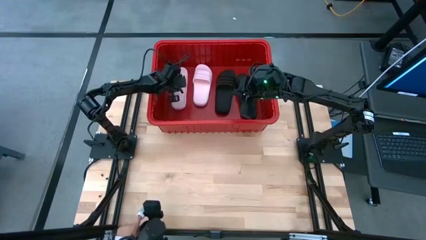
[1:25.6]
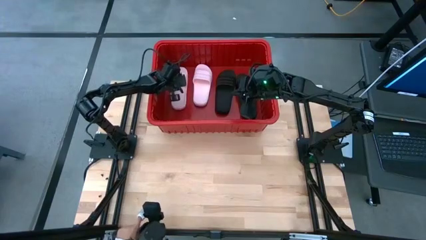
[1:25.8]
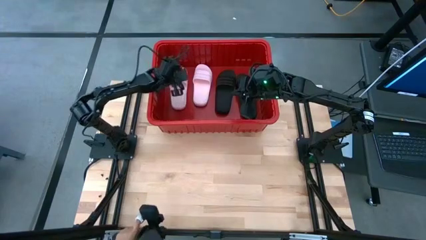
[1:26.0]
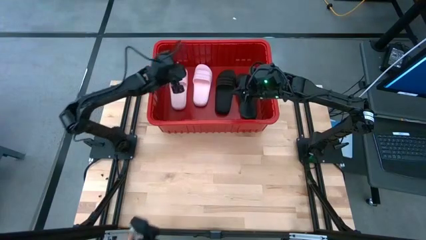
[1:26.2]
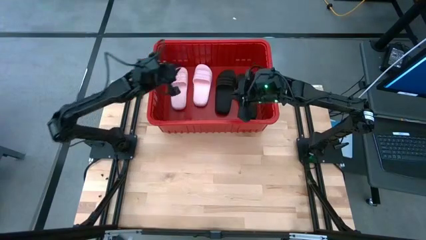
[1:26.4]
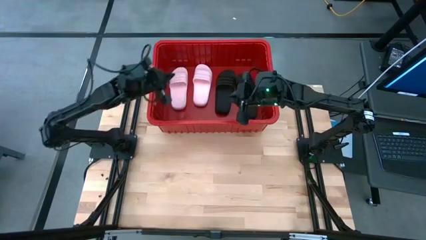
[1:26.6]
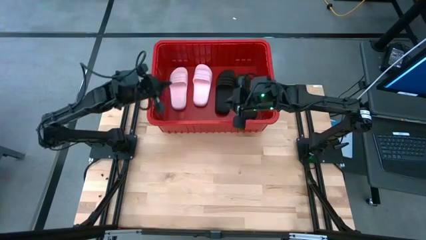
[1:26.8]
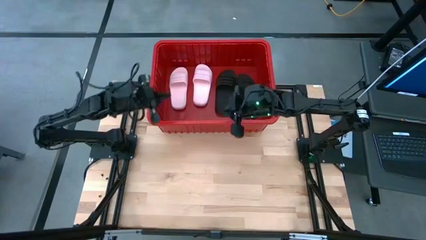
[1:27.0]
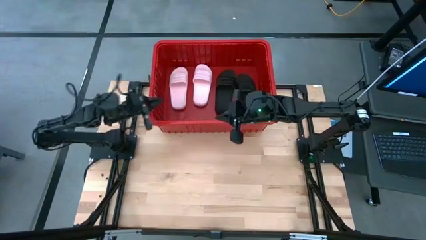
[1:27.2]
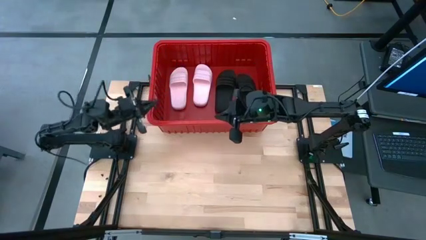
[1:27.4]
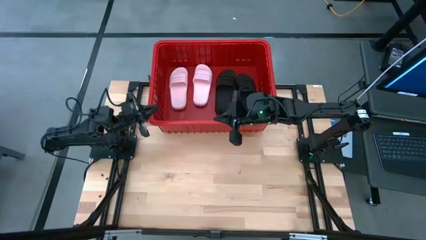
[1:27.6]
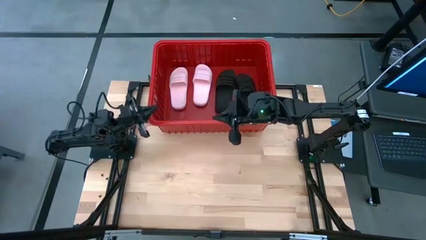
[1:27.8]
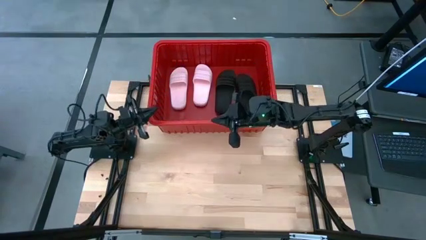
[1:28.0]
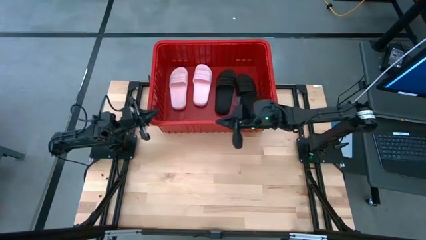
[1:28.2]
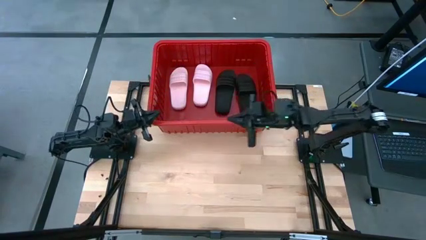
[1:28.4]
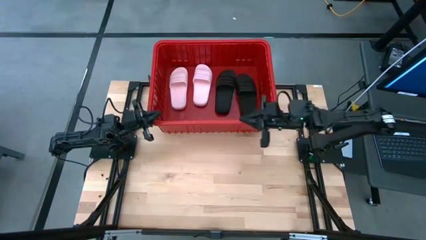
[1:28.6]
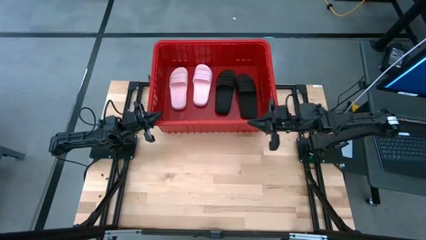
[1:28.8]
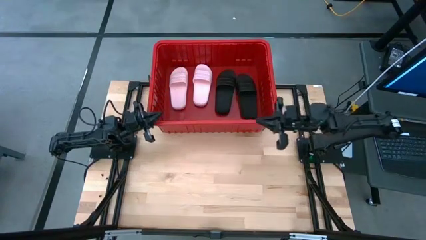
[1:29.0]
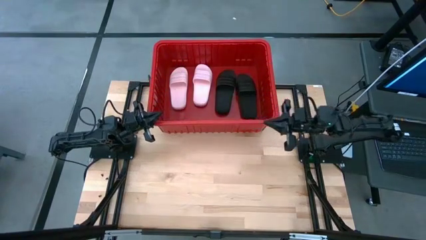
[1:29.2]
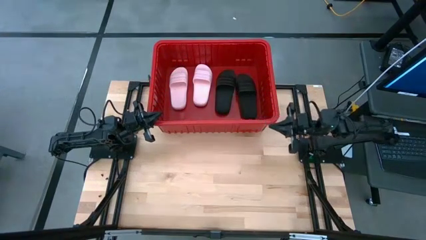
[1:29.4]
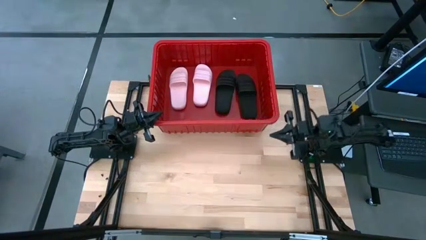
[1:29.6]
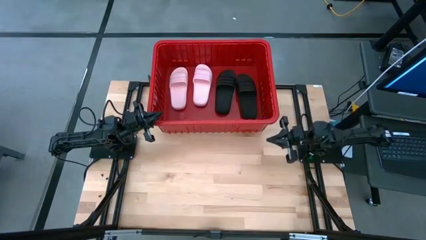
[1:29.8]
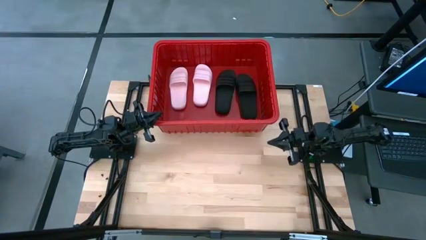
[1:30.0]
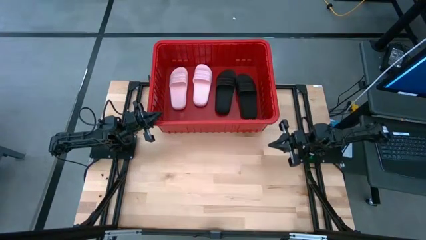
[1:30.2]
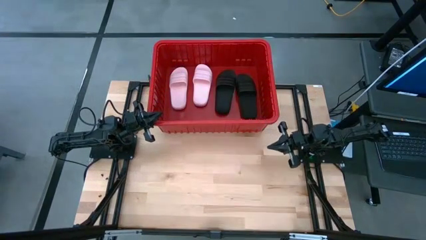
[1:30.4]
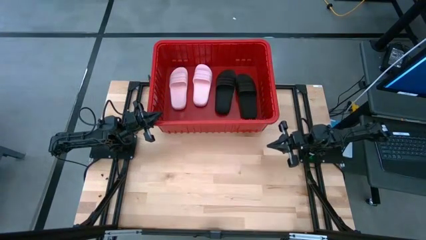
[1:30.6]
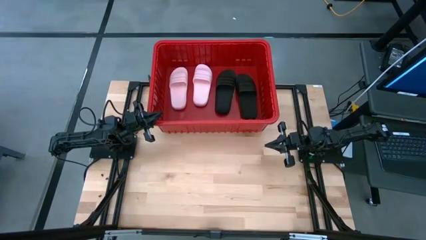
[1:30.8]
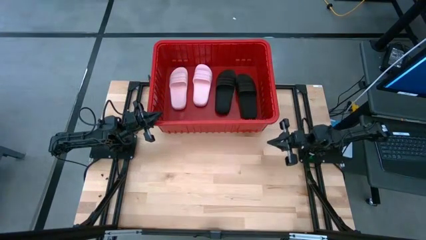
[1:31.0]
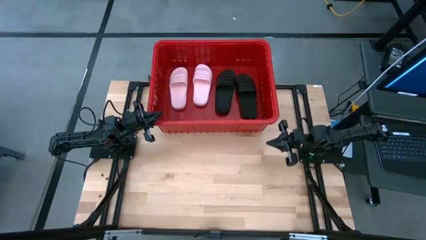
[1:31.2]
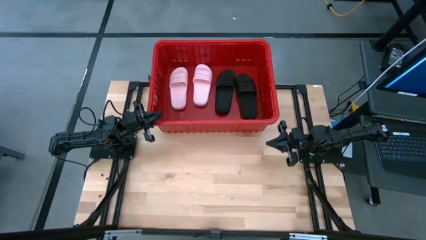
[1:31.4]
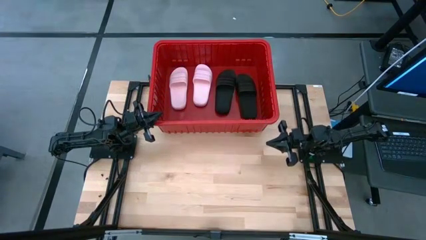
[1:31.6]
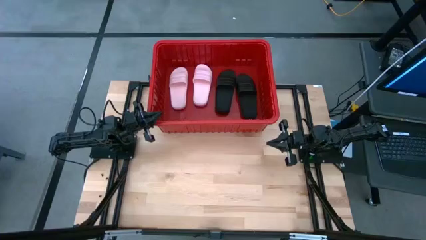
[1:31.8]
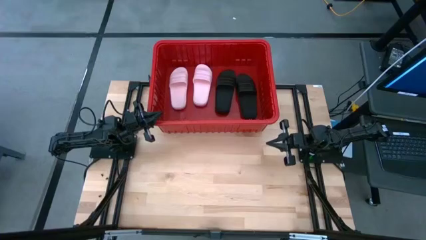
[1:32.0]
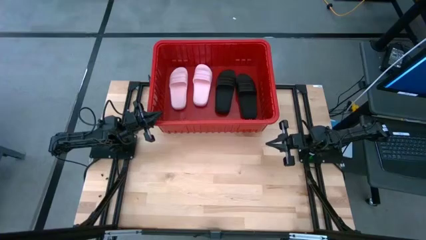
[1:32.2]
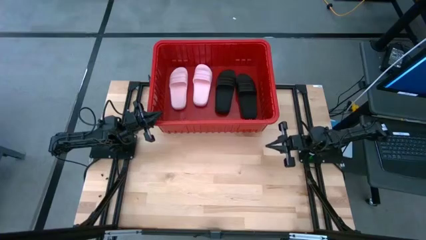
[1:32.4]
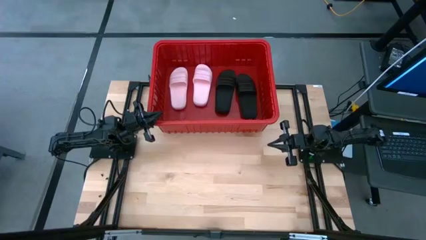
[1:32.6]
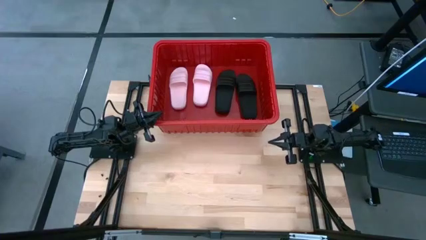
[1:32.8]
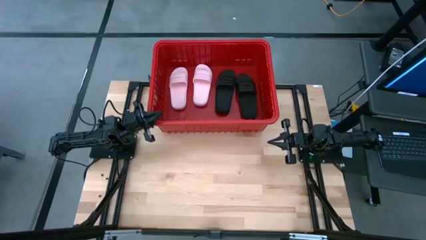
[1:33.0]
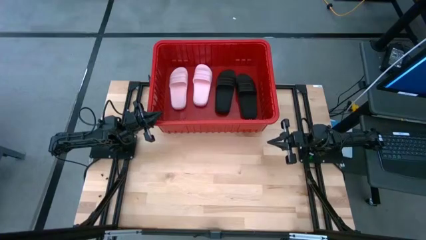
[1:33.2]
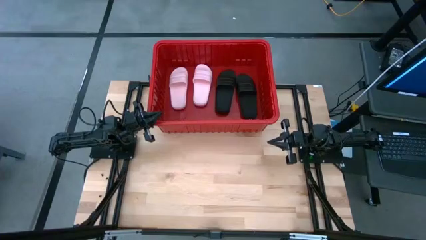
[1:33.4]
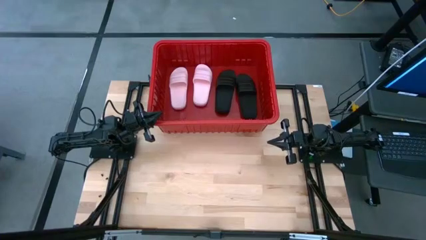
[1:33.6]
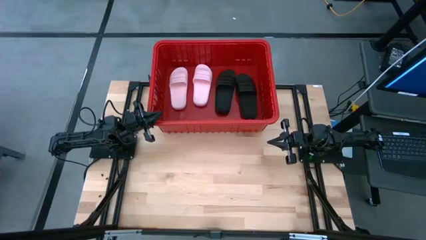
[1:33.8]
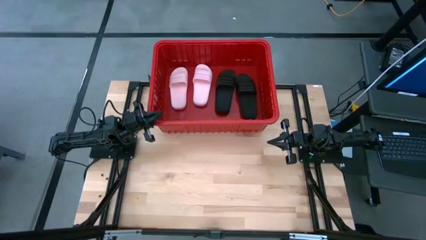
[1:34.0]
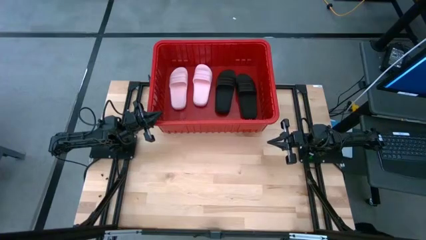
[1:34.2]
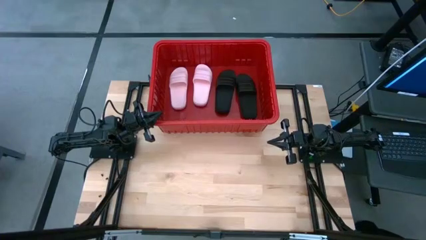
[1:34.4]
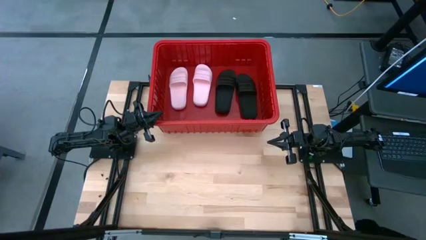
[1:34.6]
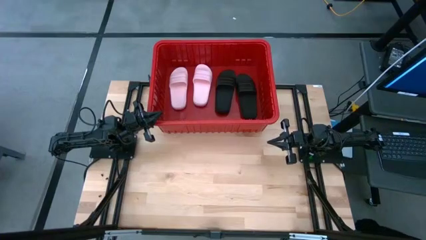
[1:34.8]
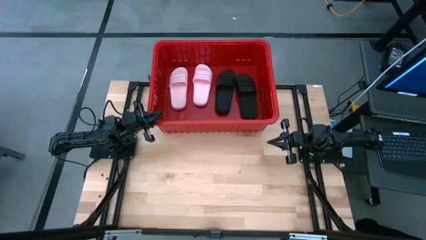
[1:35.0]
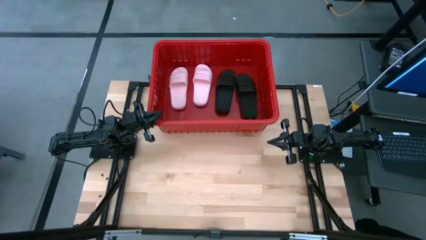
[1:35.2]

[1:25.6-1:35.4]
Task: Pick and place slides into bin
Return to Home Position
